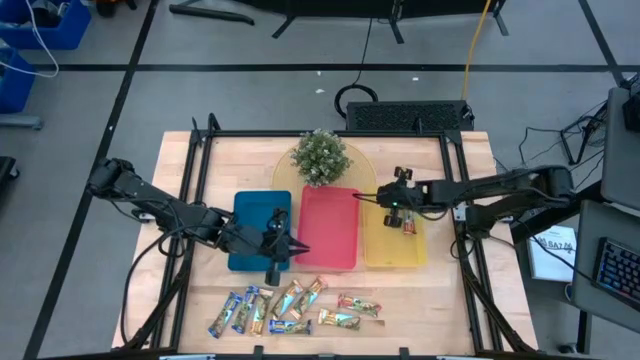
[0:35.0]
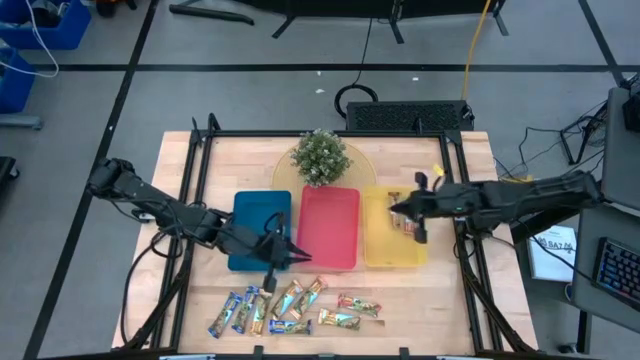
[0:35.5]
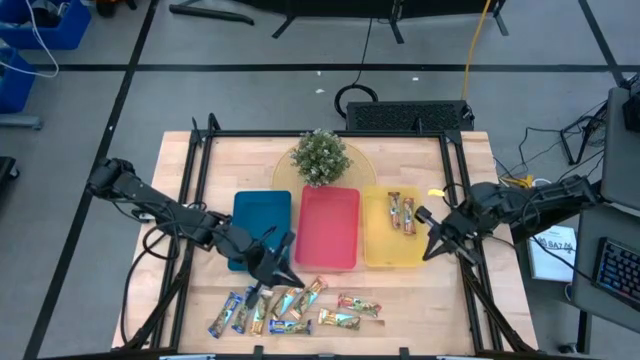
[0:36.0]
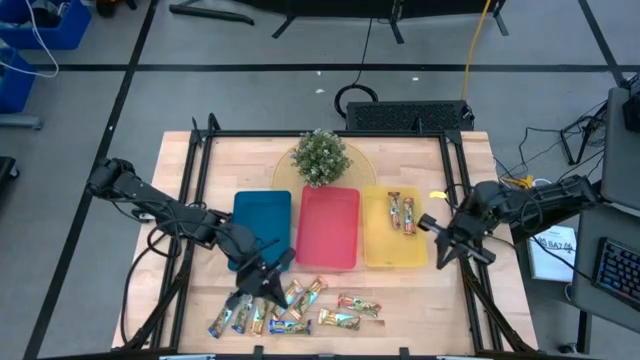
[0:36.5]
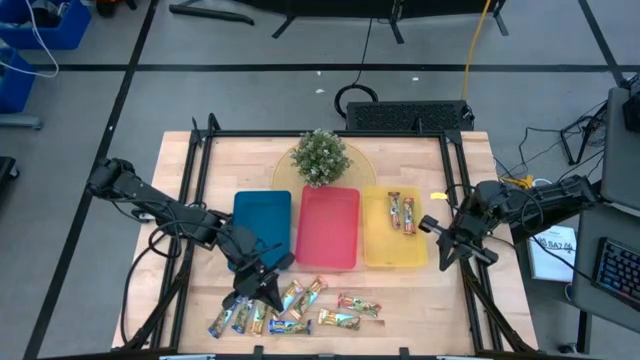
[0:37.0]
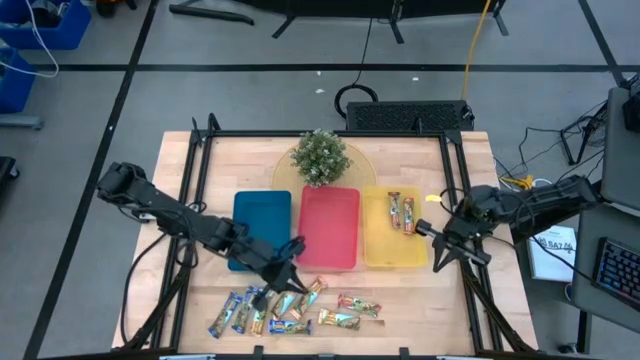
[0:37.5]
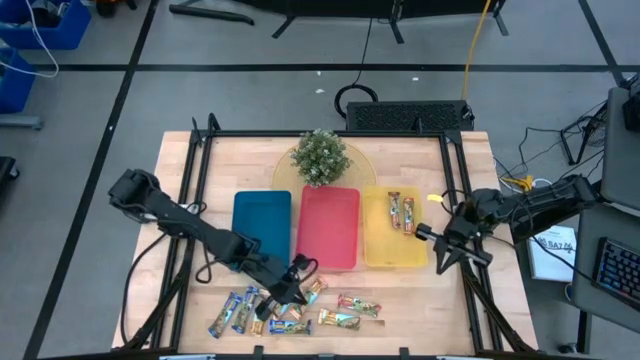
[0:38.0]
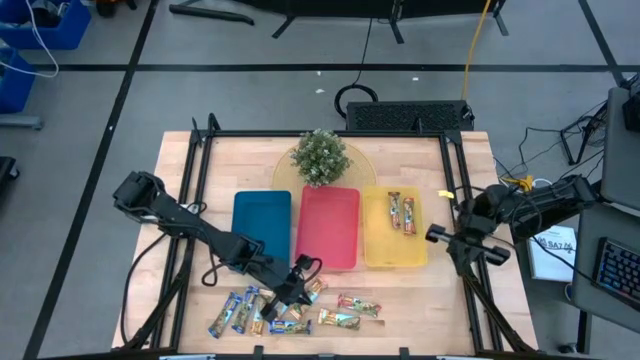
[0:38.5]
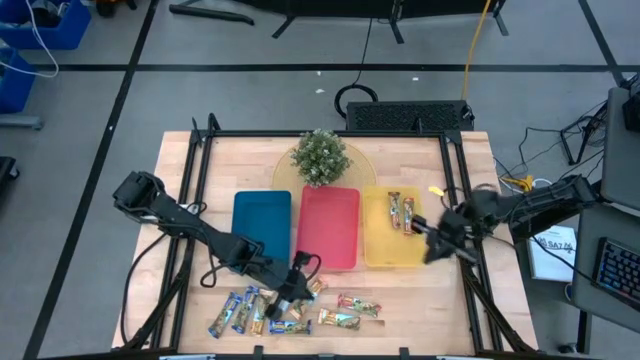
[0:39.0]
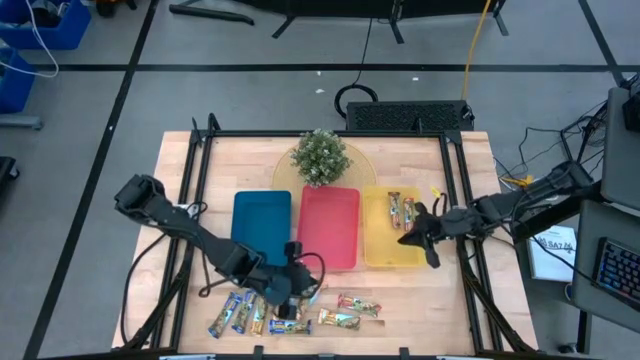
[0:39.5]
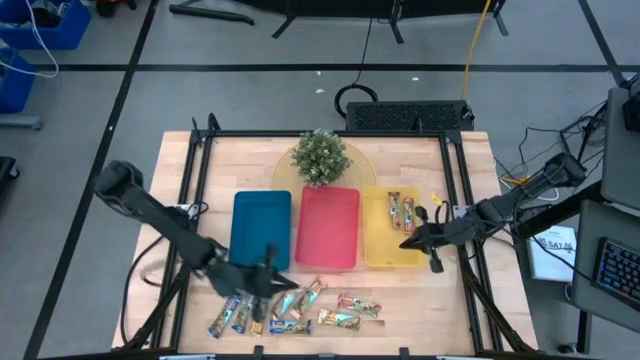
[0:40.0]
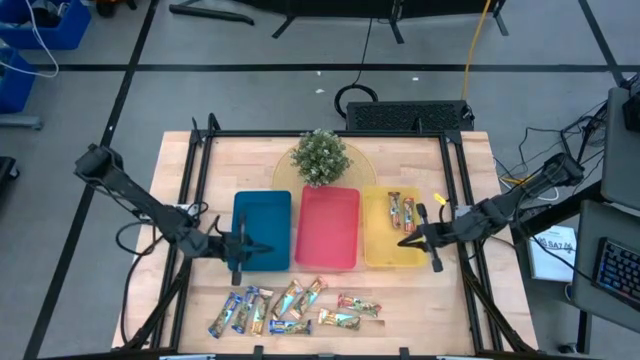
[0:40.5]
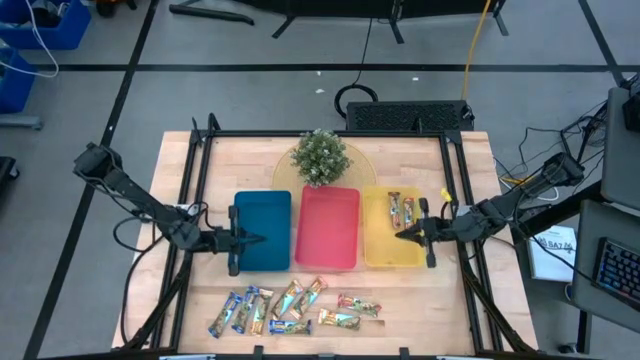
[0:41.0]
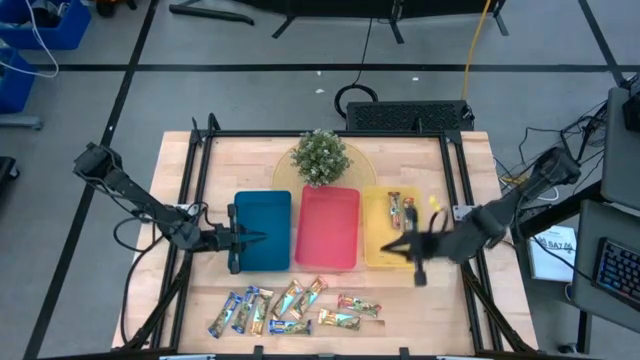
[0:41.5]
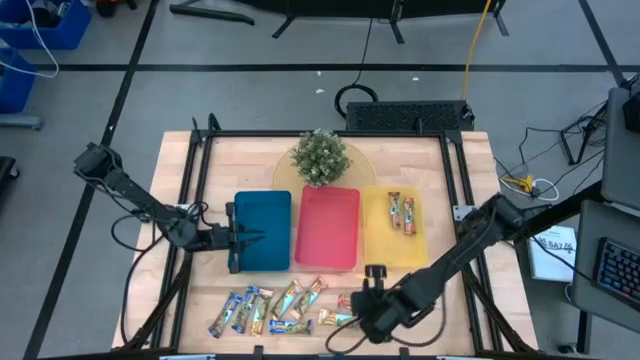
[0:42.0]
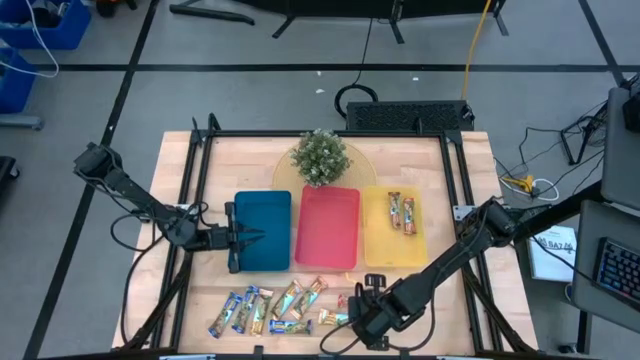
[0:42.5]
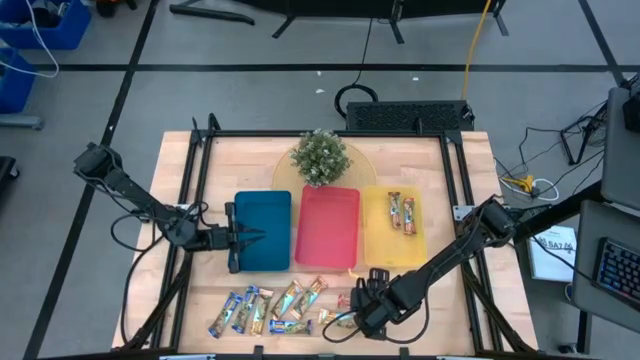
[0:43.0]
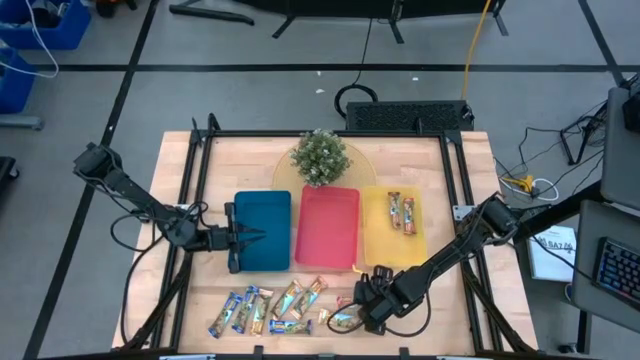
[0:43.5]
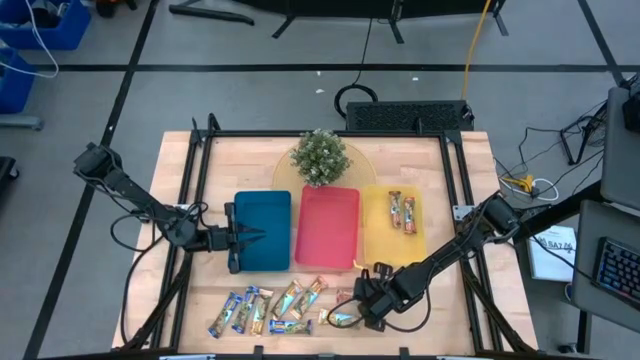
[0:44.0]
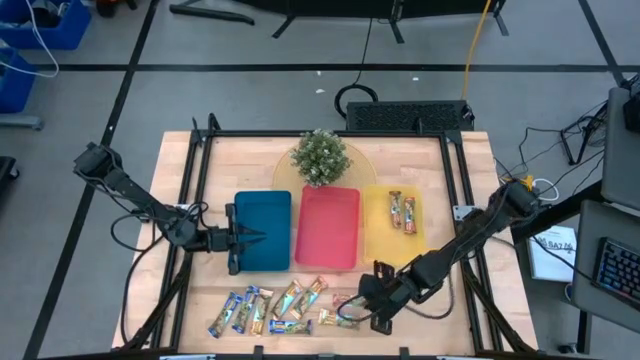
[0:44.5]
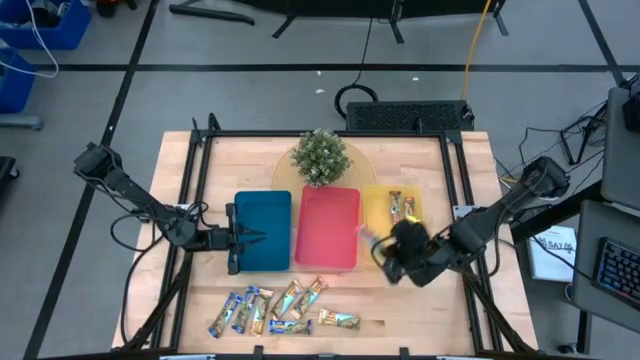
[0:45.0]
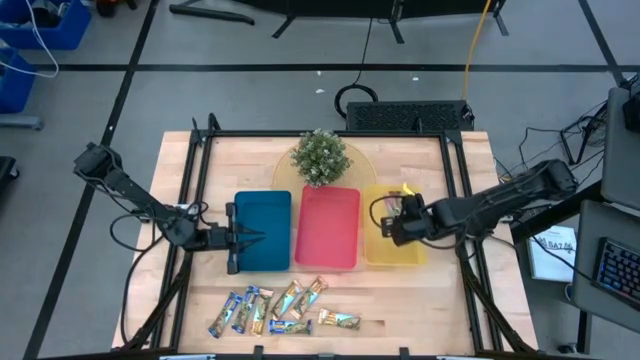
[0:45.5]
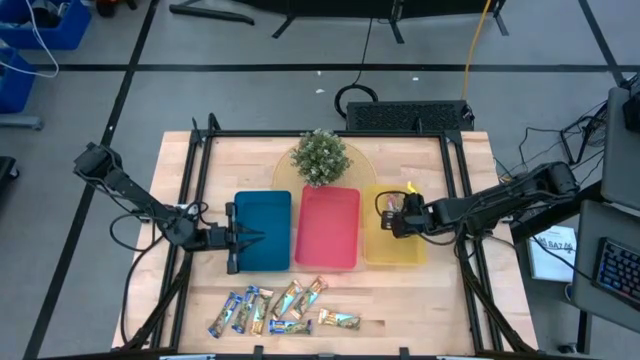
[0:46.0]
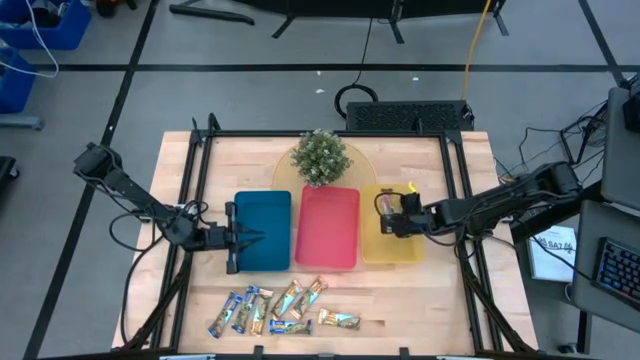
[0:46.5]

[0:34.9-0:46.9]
Task: Pick and place Granola Bars by type
Put the red granola bar into the yellow bin

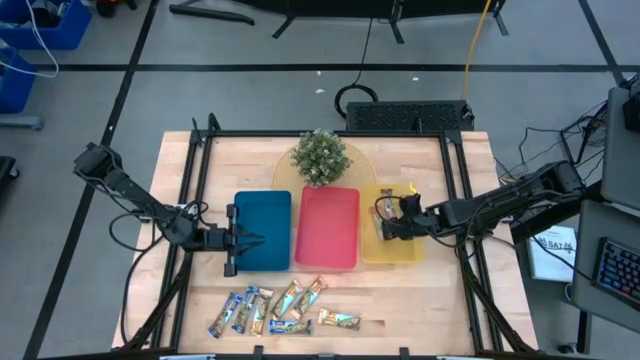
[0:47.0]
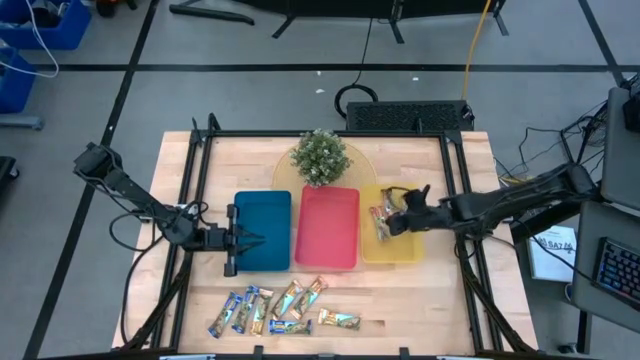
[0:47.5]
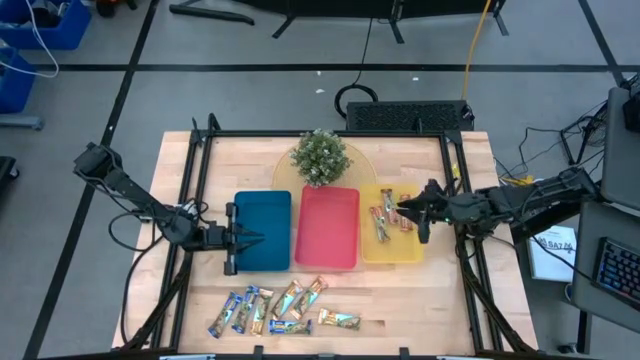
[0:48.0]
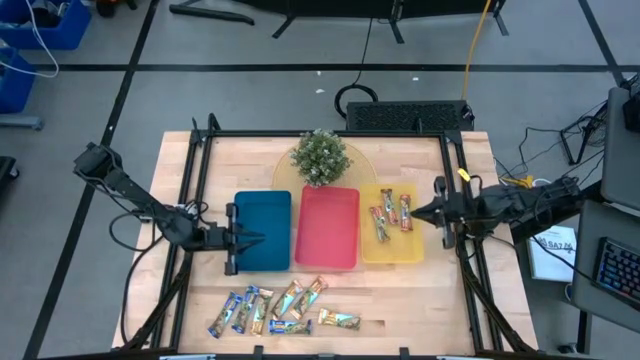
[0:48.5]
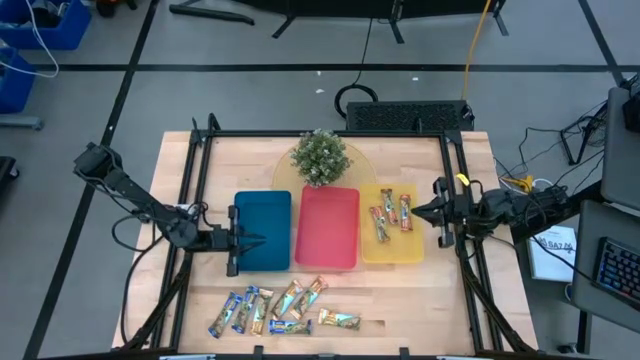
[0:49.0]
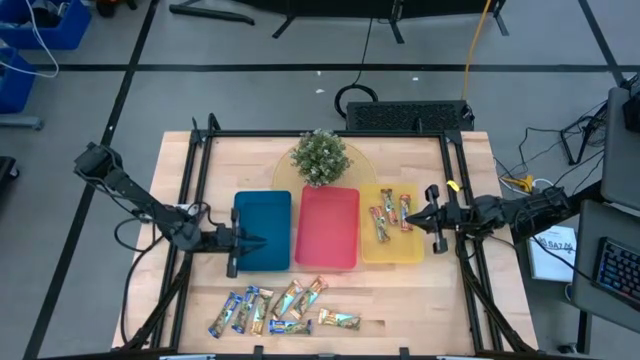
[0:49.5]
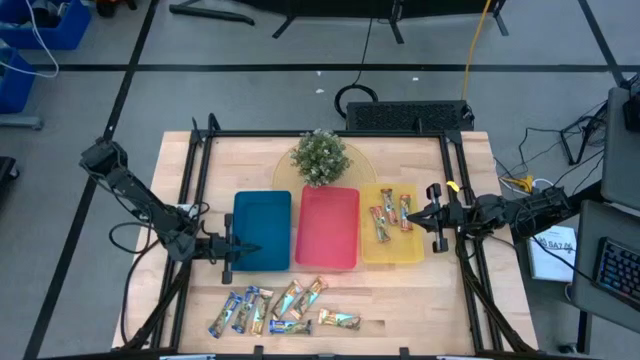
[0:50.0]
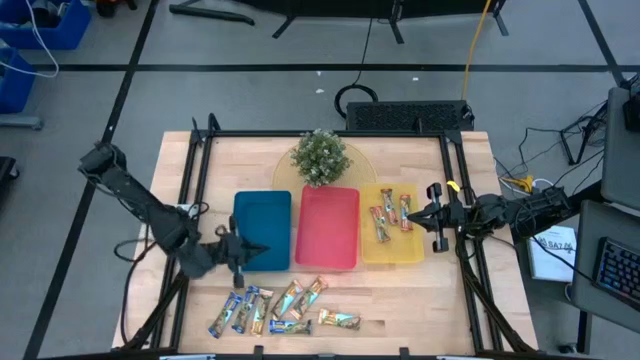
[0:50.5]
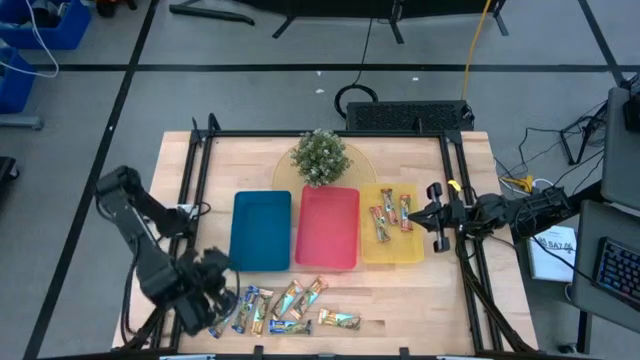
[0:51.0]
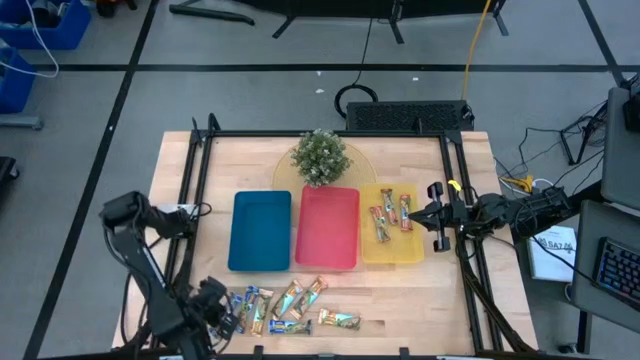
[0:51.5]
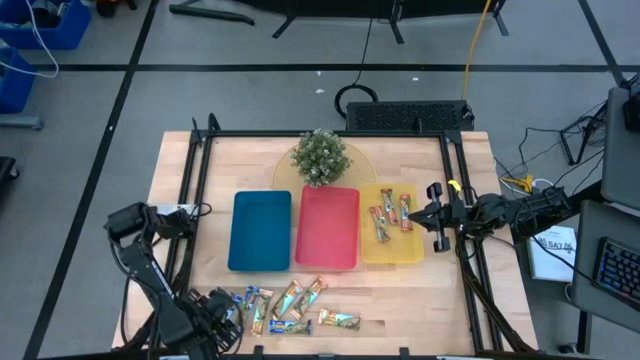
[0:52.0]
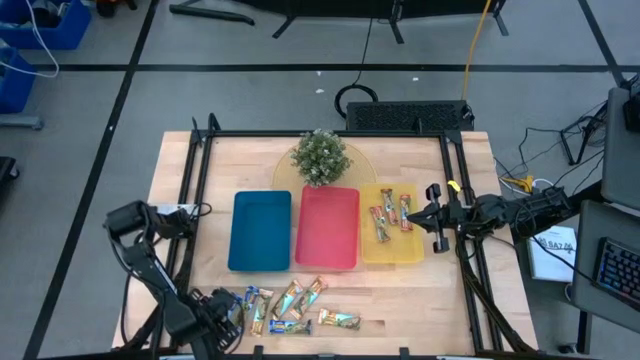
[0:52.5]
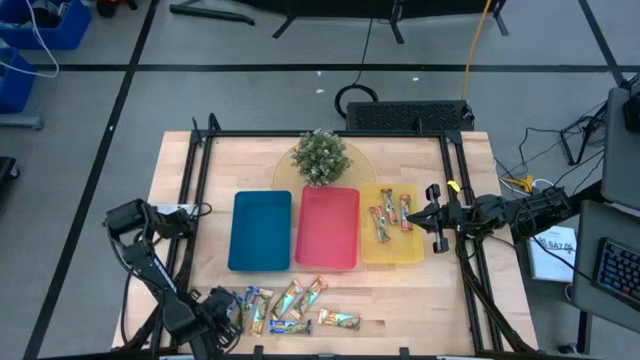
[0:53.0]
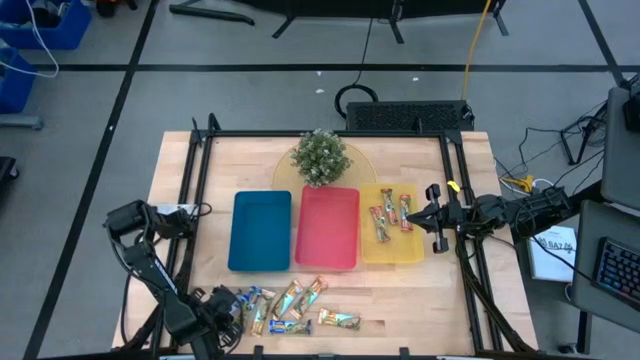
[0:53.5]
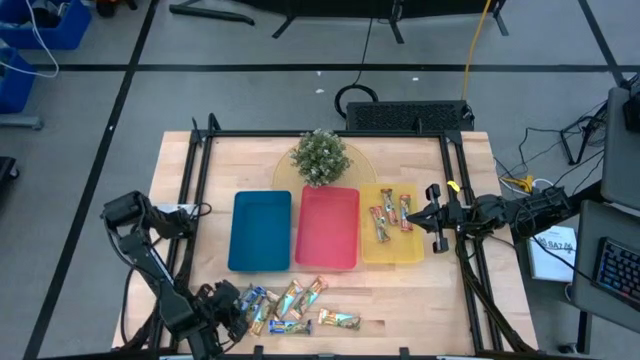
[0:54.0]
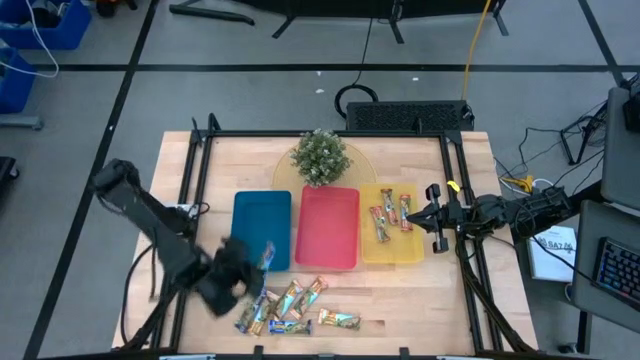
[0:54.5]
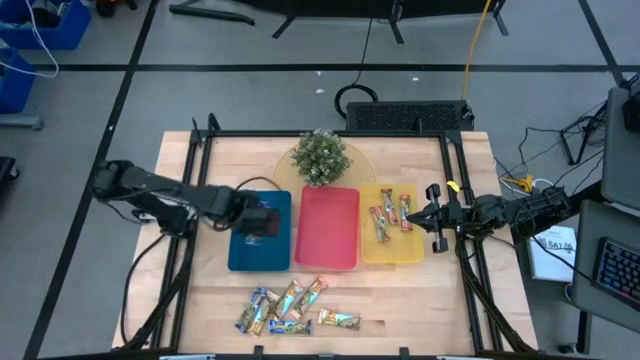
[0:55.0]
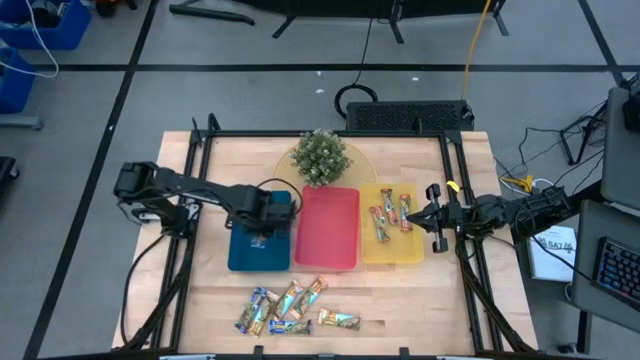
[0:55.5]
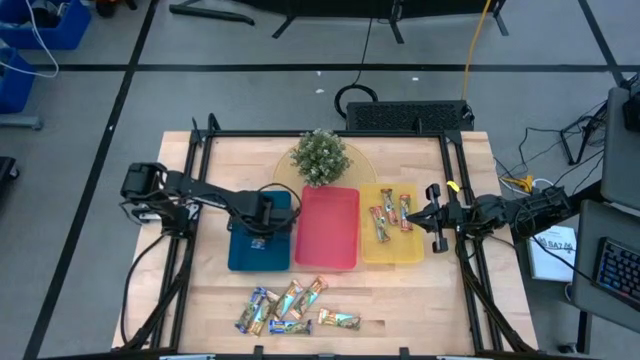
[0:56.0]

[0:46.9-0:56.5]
Put the left blue granola bar into the blue bin

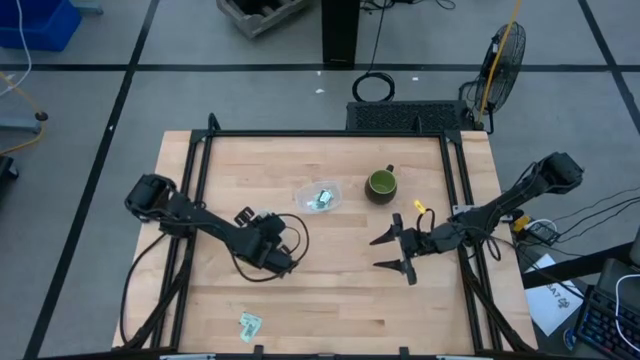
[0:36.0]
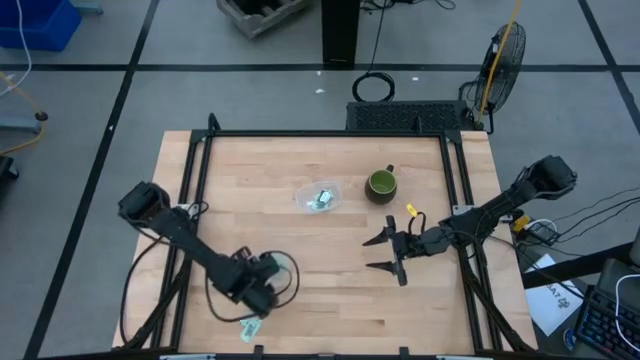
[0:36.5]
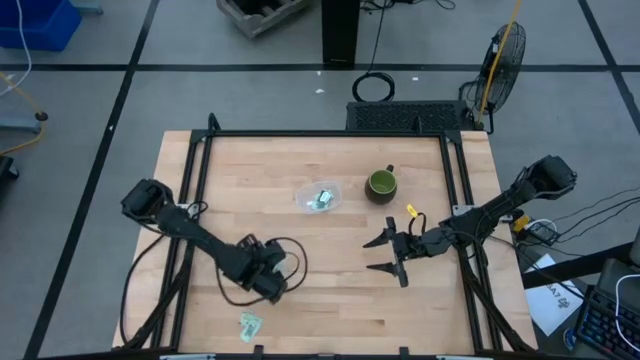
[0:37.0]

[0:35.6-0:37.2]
Task: Pick and place Stevia / Truvia into bins
Adjust the round container
